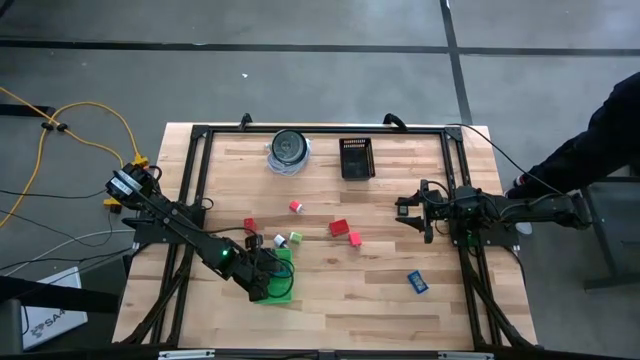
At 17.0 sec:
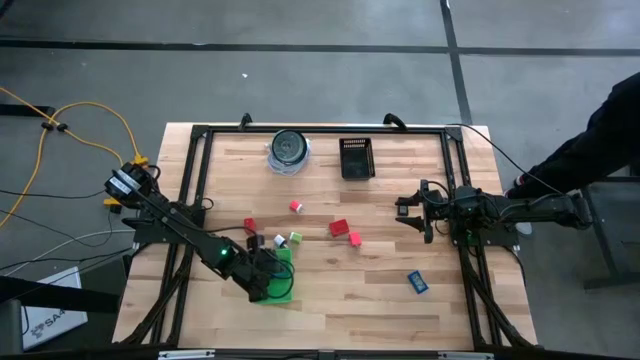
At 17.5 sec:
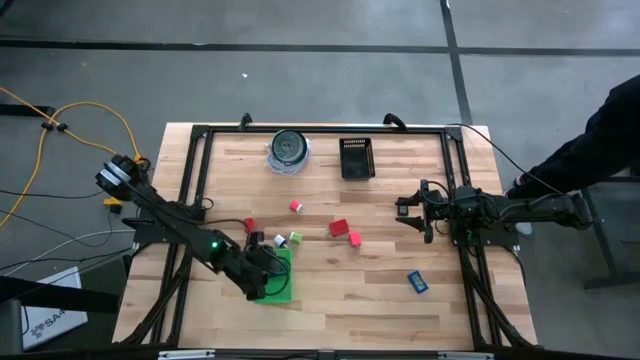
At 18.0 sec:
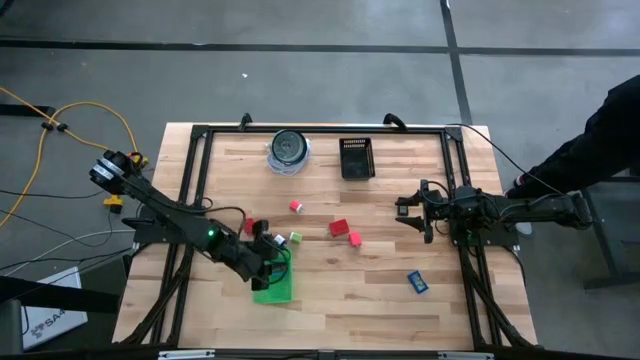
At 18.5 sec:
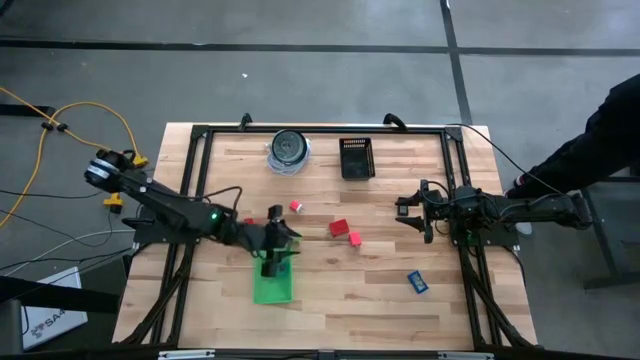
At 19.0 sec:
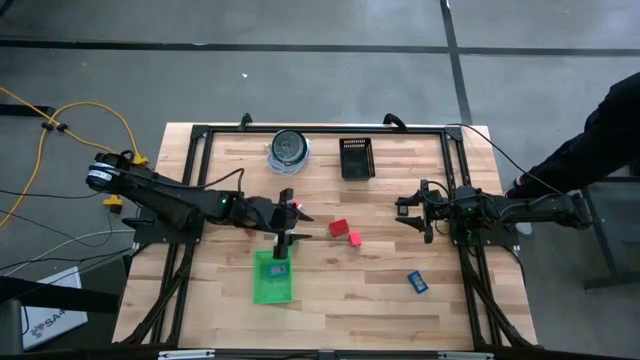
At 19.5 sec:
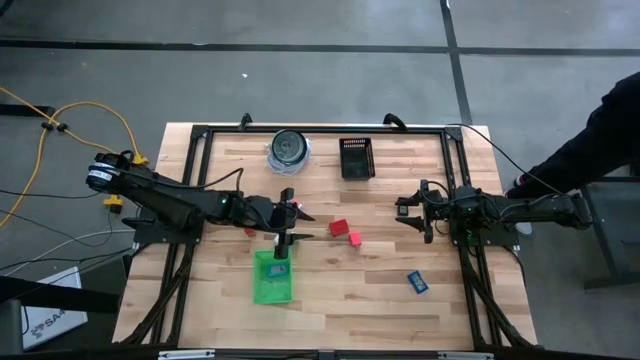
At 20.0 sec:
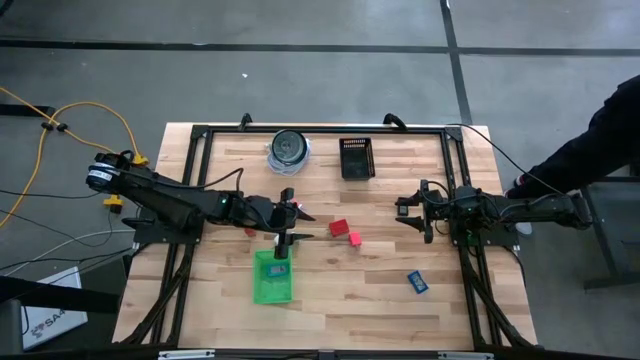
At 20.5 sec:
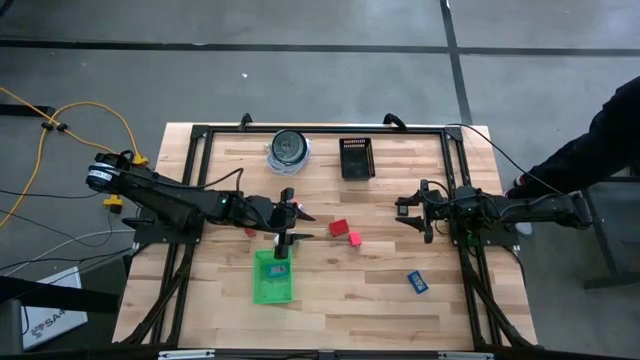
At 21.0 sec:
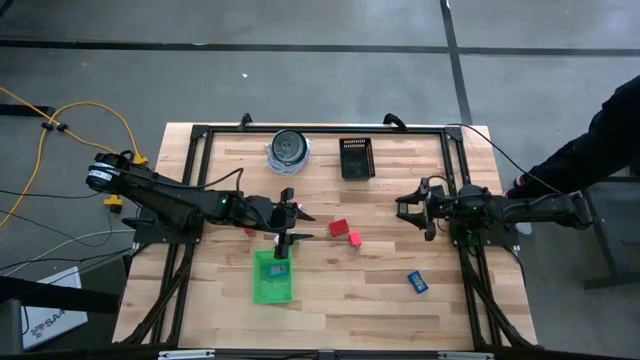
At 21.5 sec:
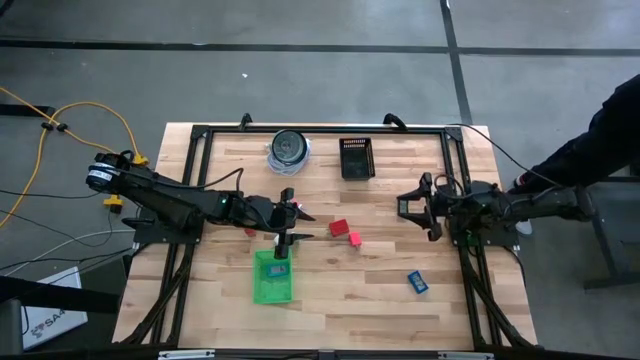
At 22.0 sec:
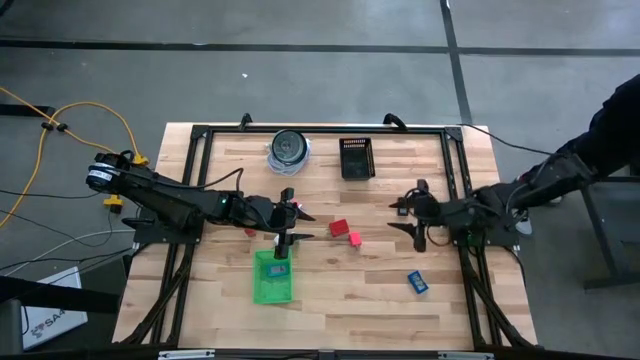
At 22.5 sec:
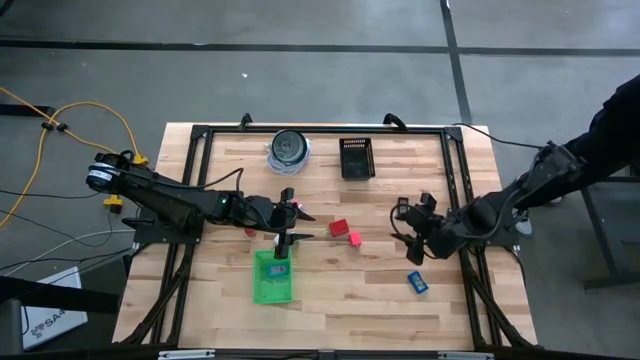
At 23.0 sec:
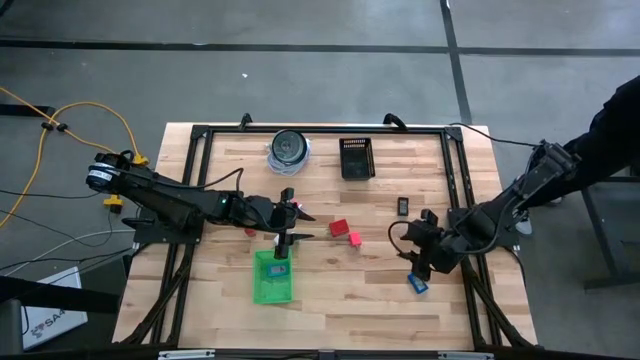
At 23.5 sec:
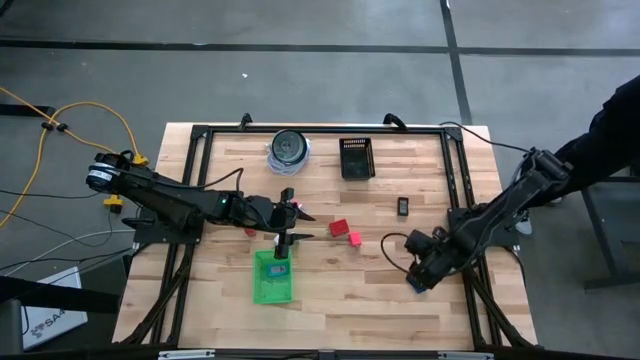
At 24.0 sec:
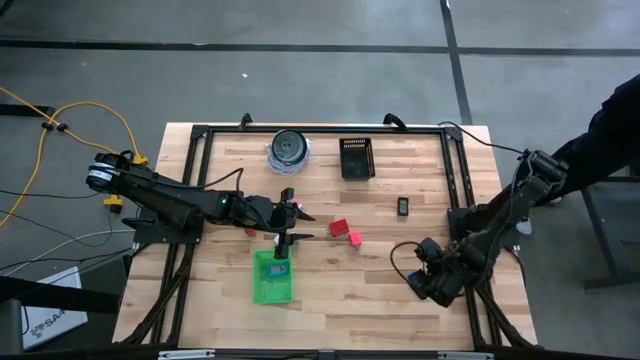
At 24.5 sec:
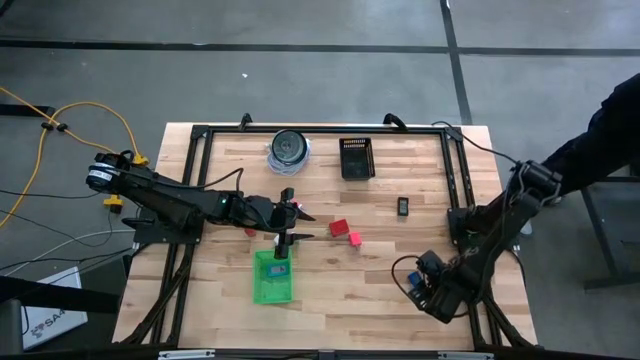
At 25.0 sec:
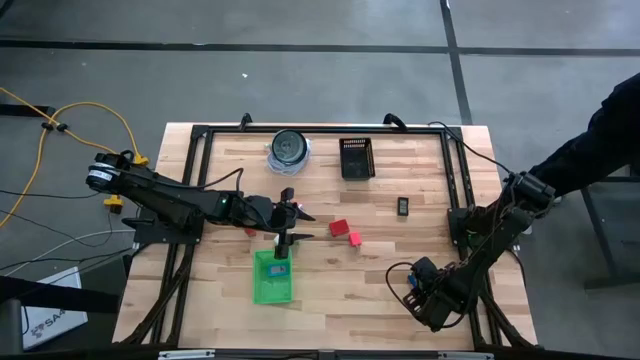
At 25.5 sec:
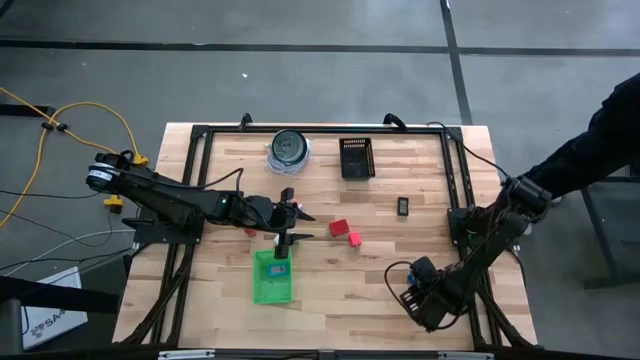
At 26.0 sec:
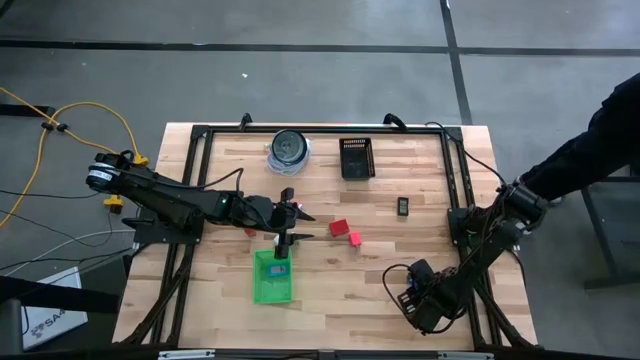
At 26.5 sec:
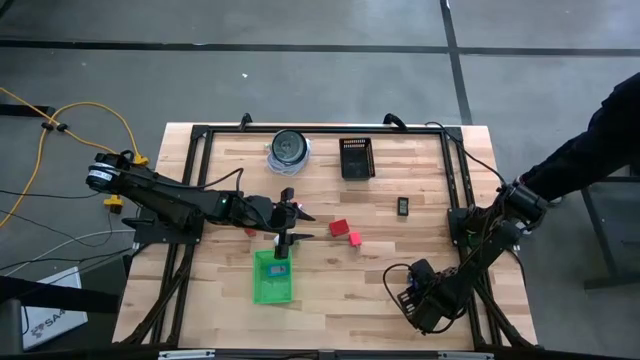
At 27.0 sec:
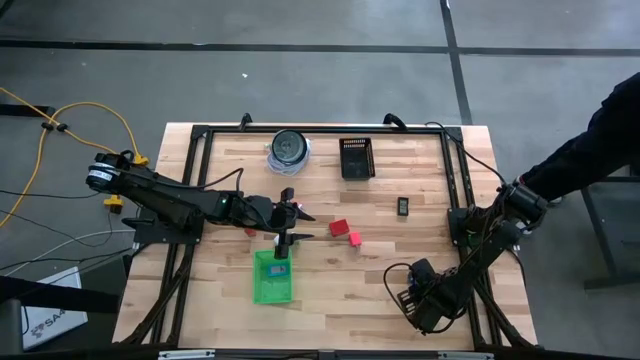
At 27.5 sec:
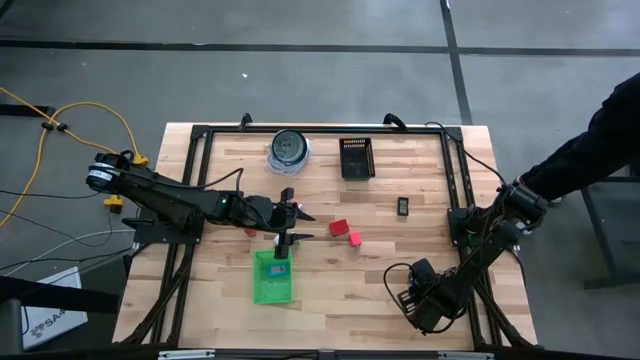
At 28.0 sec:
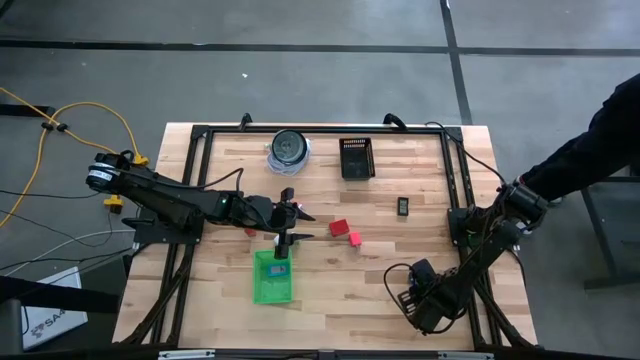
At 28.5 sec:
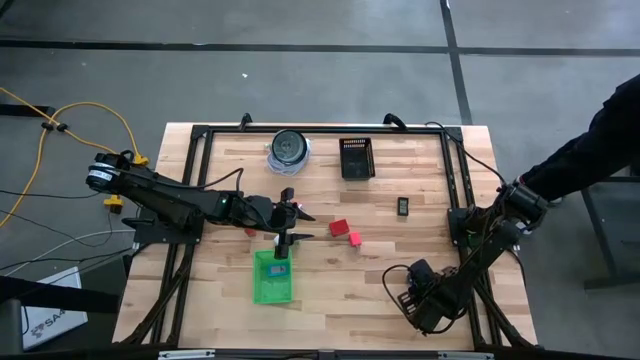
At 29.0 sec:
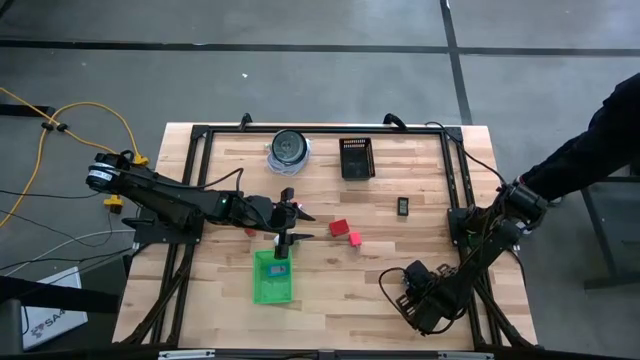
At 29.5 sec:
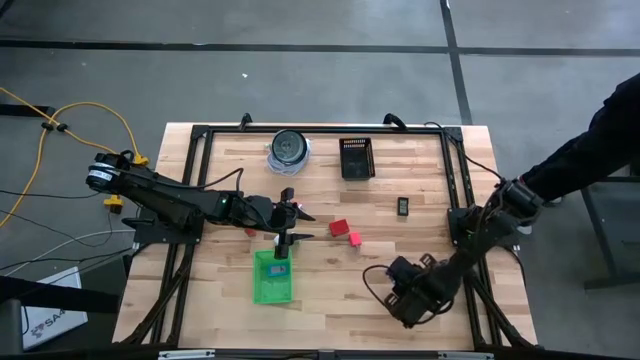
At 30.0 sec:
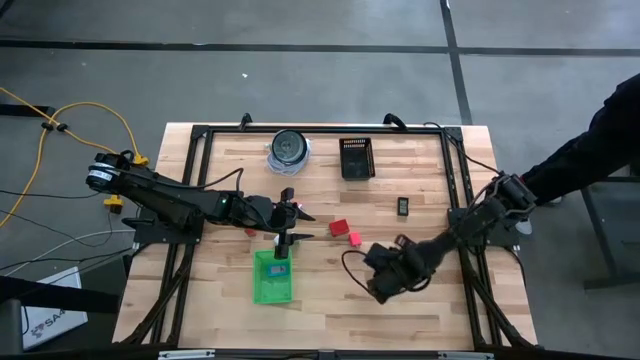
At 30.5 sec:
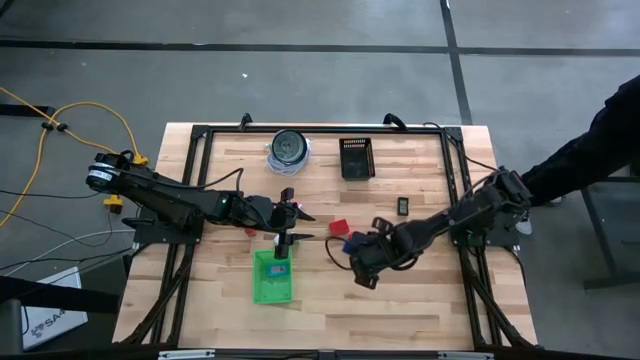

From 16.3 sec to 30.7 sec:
Task: Pick & Place Office items
Put the dark blue digital clock into the green bin
